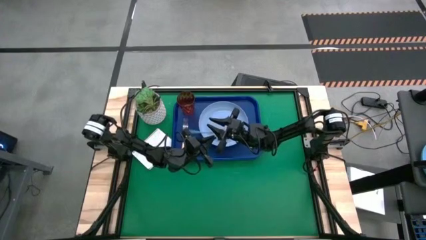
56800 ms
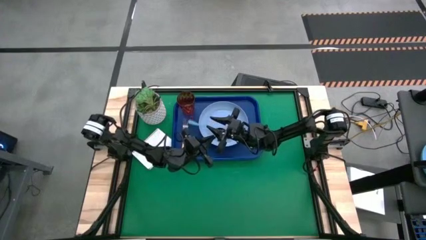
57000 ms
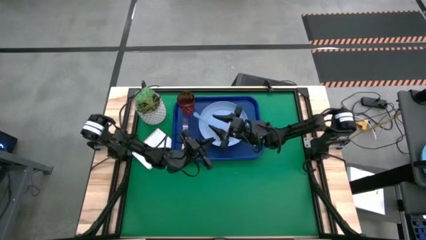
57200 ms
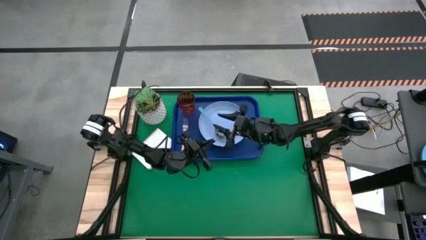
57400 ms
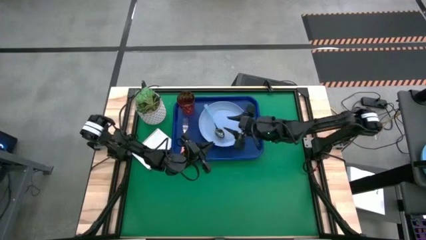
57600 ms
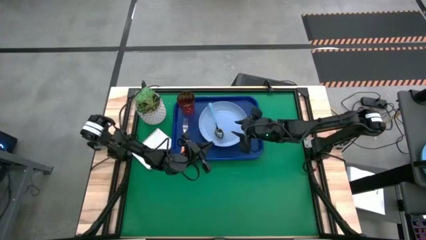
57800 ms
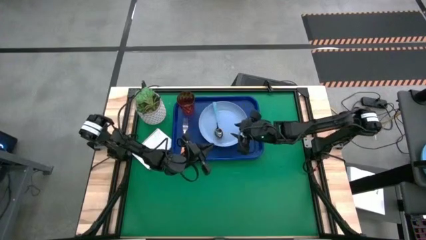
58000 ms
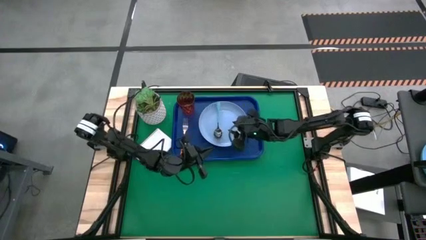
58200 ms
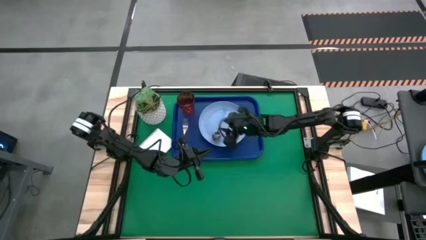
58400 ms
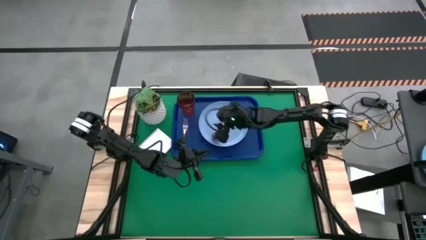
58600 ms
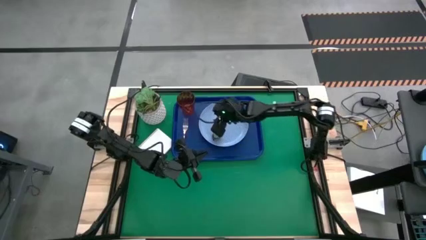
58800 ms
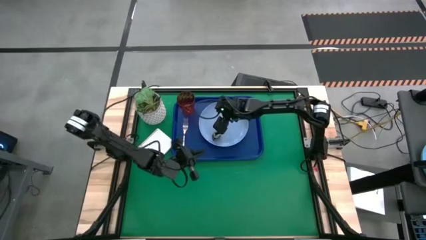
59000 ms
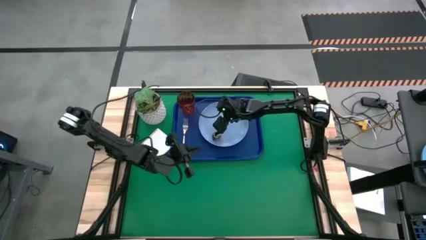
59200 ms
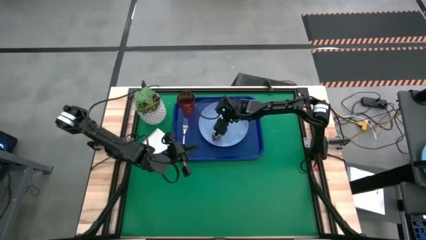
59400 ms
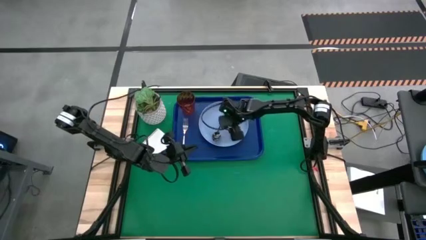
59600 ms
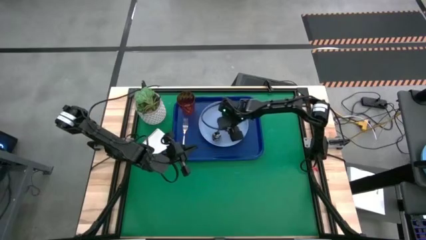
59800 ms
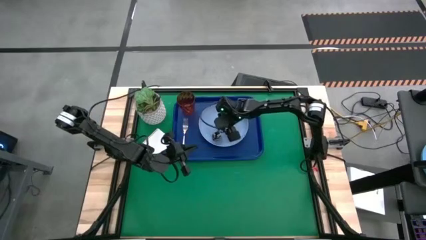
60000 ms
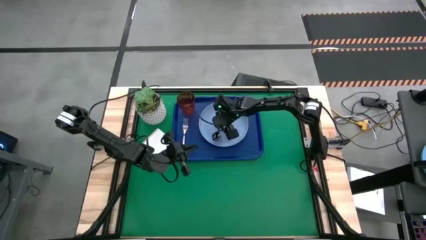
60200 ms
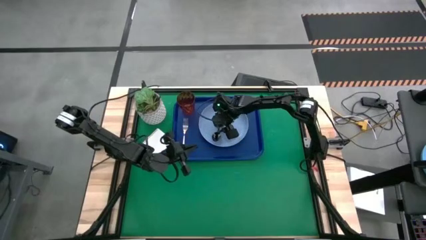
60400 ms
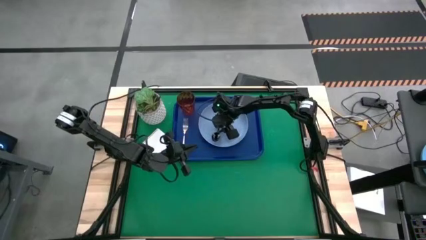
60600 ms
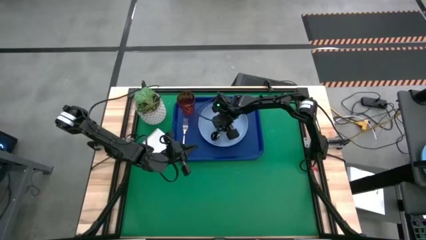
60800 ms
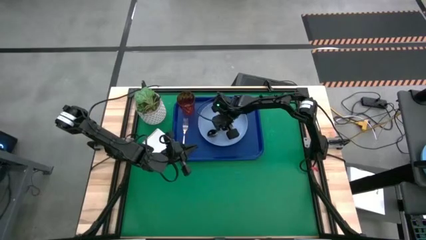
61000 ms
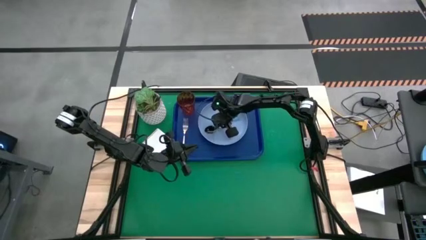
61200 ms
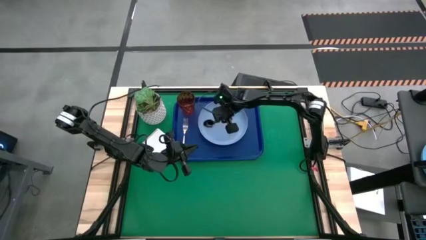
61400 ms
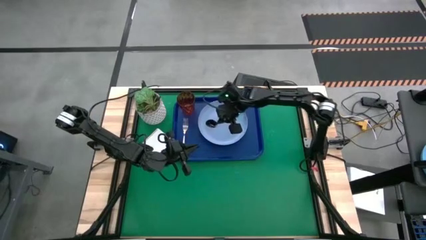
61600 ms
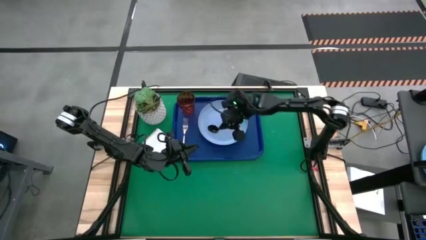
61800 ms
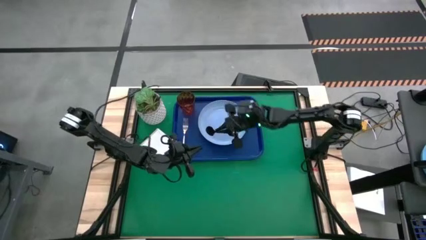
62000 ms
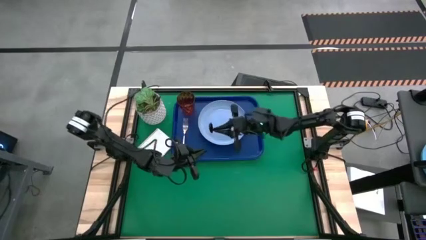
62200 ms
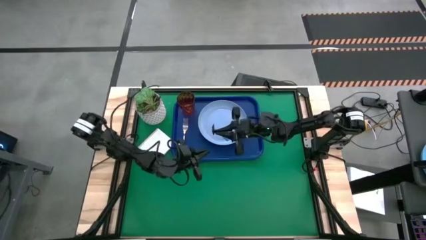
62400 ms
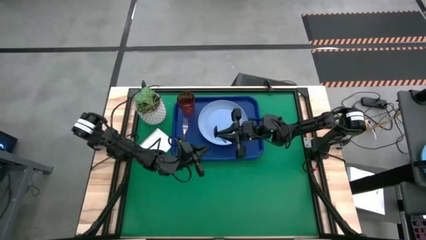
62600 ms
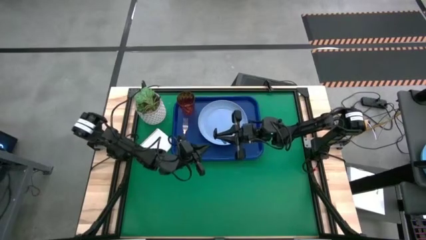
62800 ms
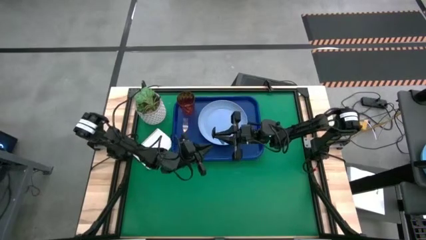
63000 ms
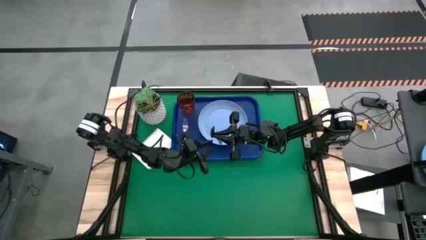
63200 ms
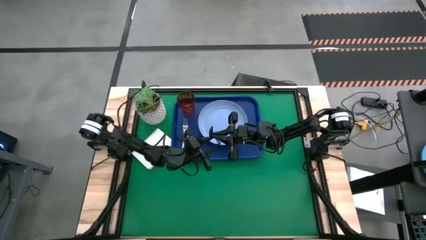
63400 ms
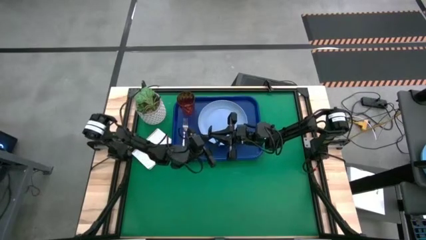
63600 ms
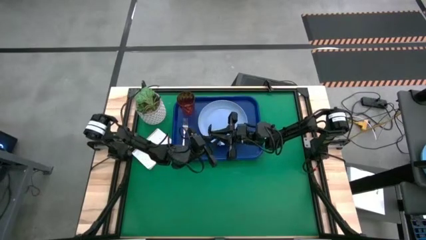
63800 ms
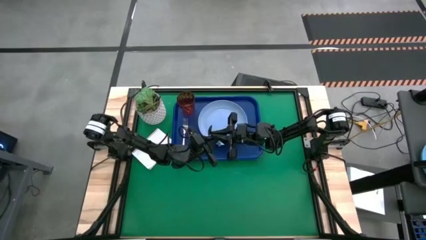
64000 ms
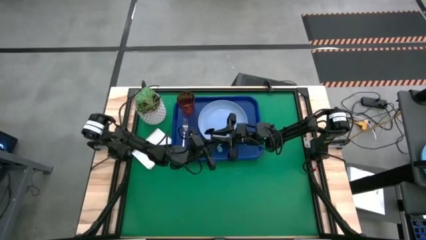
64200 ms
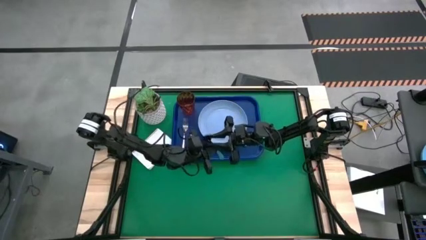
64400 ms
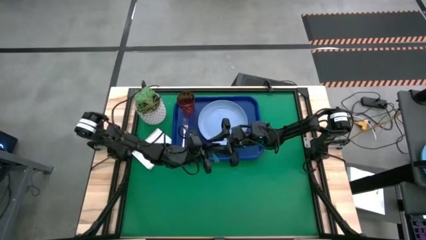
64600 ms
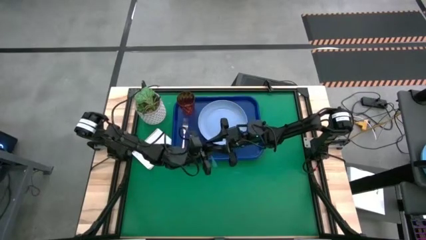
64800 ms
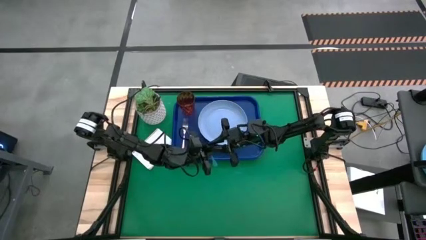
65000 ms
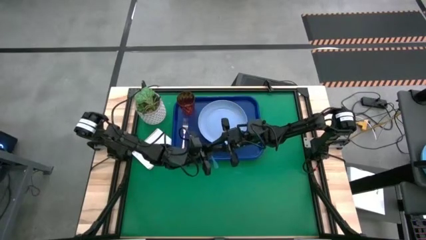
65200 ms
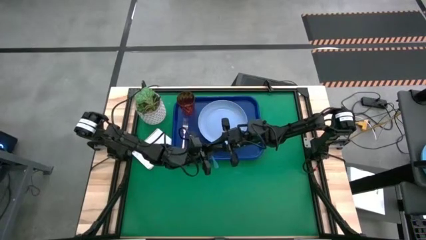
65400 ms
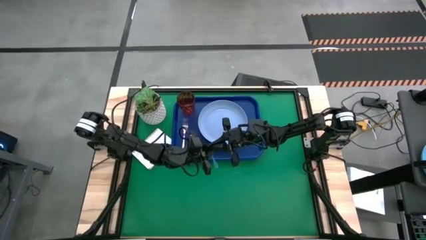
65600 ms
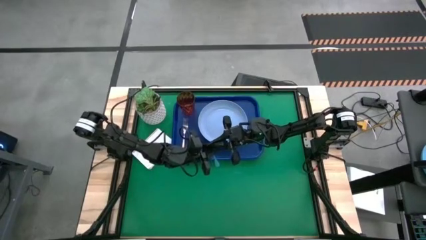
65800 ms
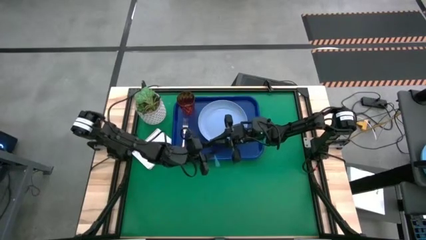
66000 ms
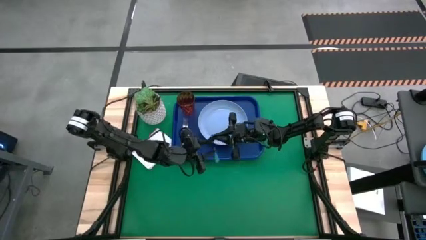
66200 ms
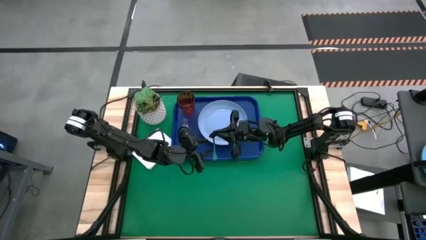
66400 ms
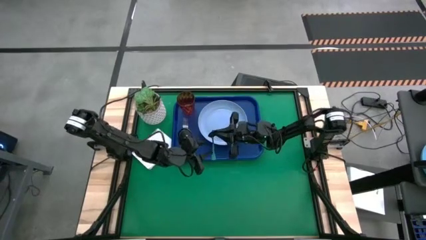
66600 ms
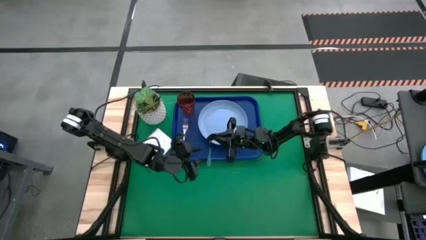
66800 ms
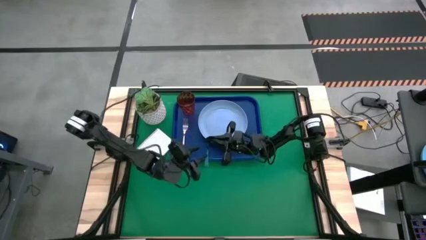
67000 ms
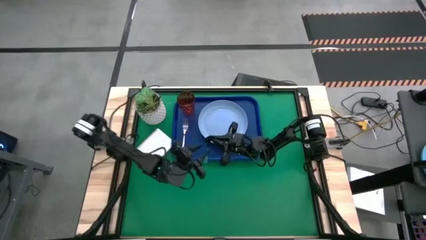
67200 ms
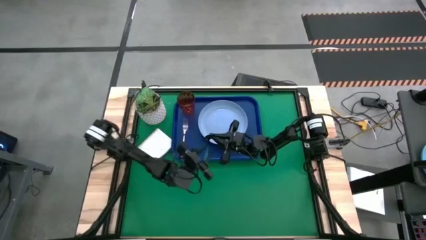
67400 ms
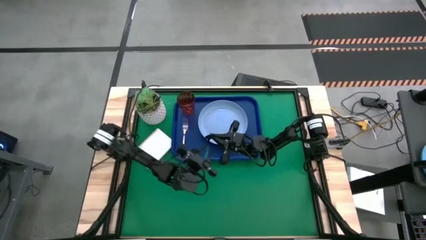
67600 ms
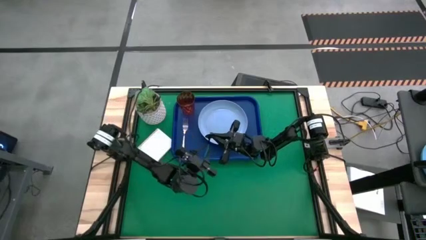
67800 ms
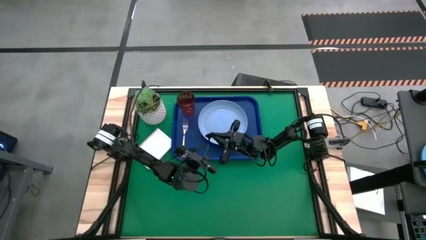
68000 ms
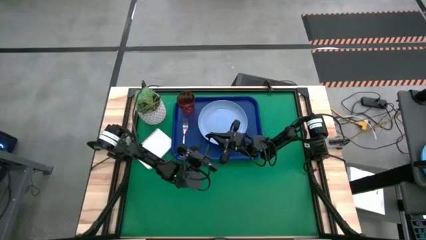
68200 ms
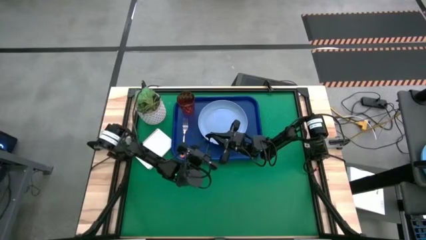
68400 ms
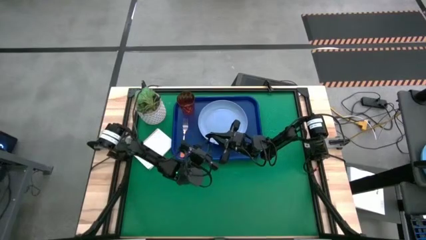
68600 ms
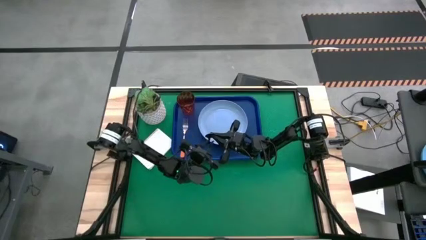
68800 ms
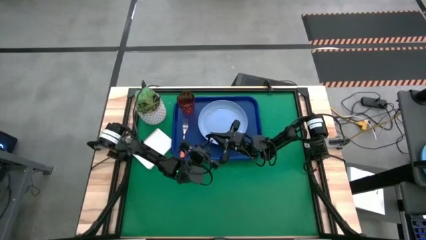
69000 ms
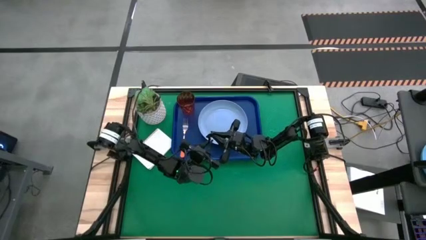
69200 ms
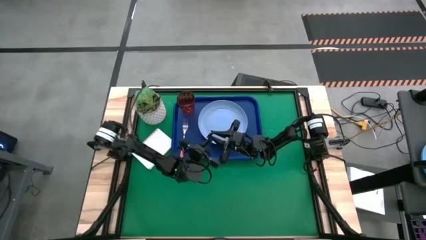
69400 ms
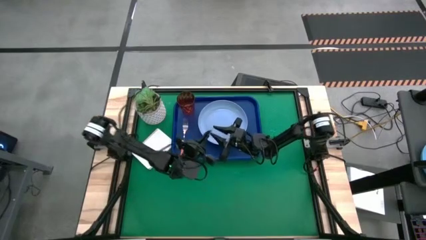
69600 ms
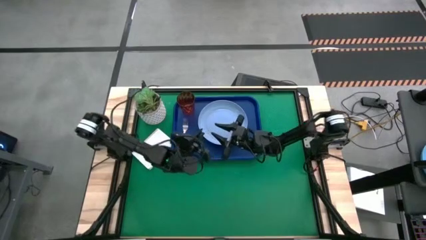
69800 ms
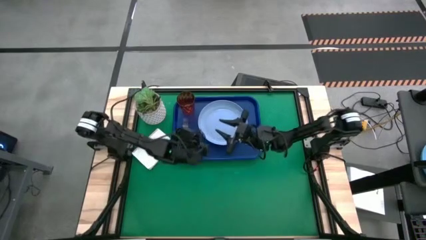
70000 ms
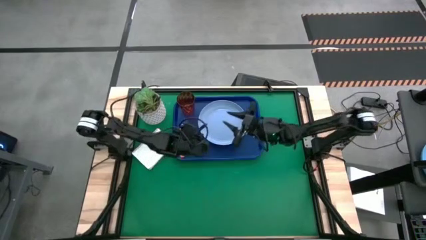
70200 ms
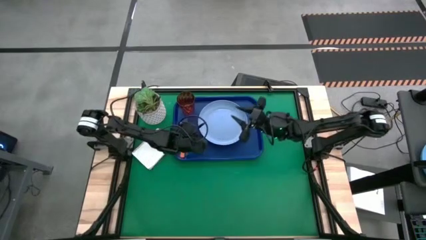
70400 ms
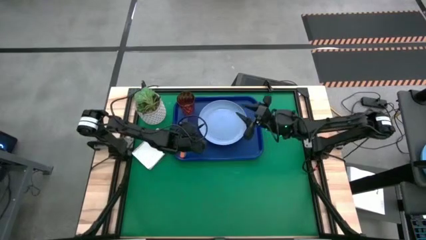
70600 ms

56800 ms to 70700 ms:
Task: Pick and place plate/cup/fork/spoon on tray
Put the blue spoon on the tray to the right of the orange fork
